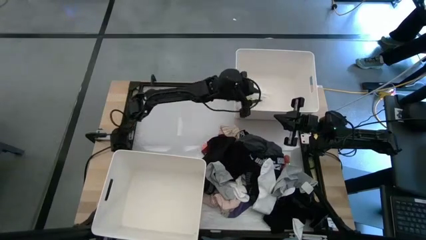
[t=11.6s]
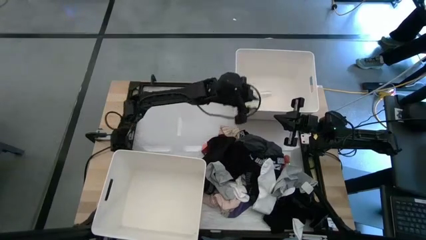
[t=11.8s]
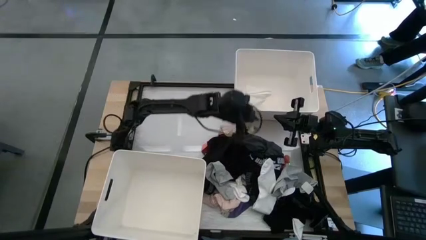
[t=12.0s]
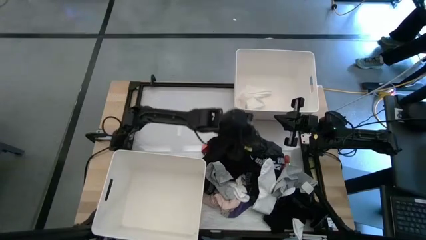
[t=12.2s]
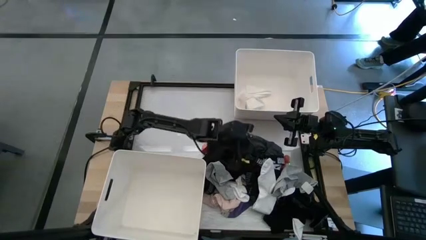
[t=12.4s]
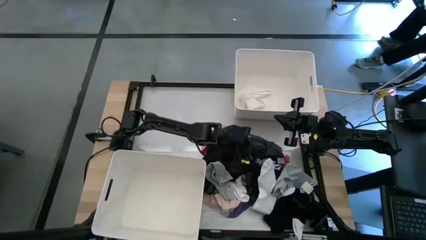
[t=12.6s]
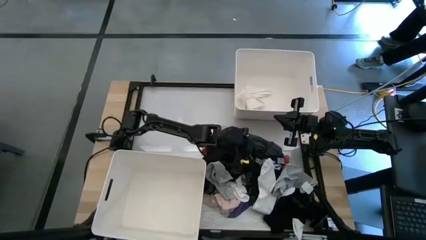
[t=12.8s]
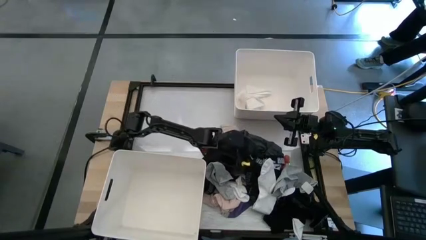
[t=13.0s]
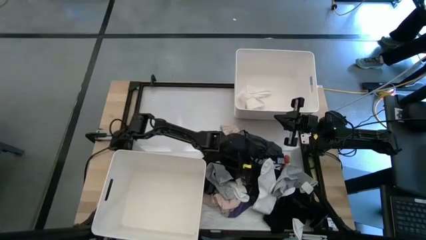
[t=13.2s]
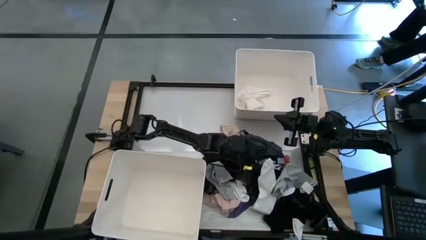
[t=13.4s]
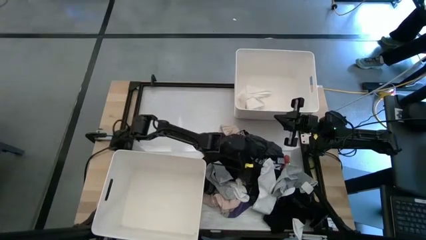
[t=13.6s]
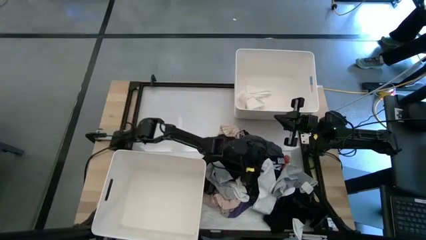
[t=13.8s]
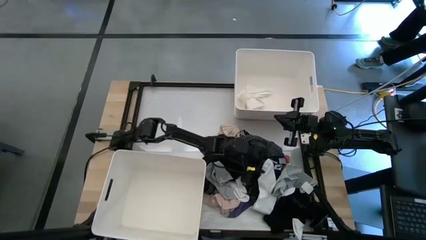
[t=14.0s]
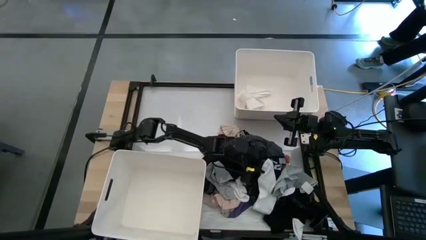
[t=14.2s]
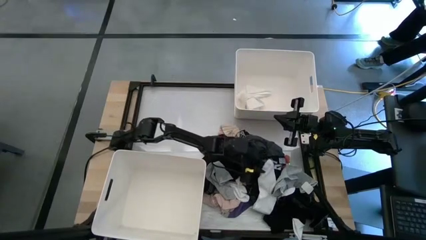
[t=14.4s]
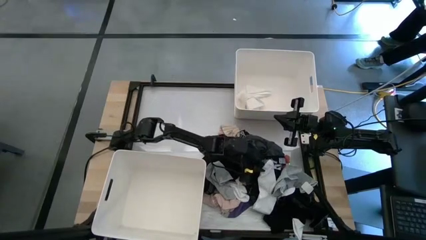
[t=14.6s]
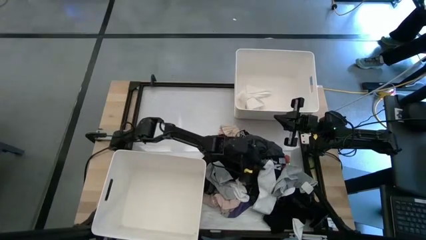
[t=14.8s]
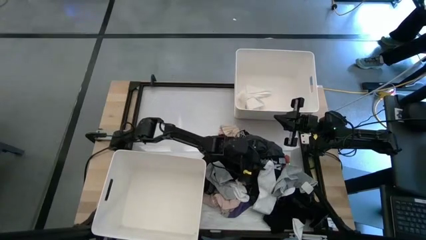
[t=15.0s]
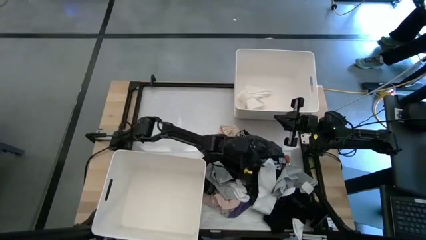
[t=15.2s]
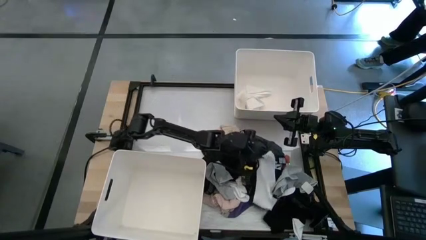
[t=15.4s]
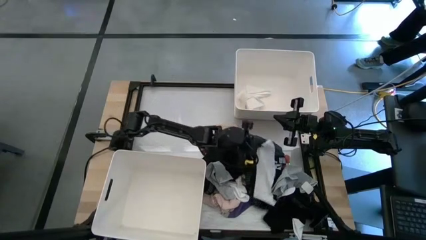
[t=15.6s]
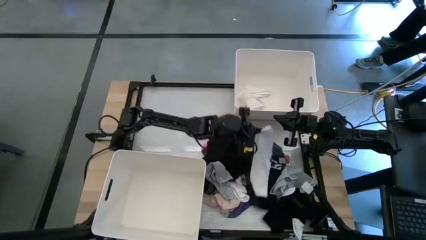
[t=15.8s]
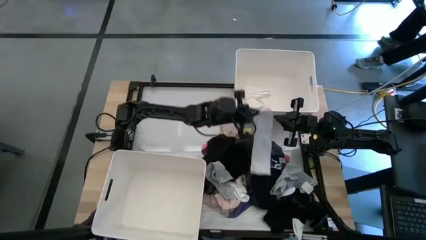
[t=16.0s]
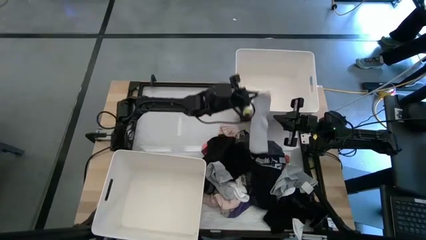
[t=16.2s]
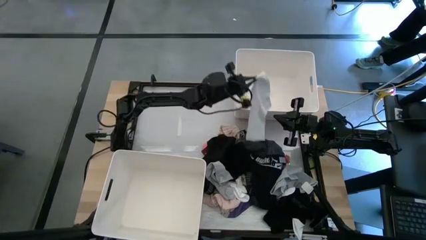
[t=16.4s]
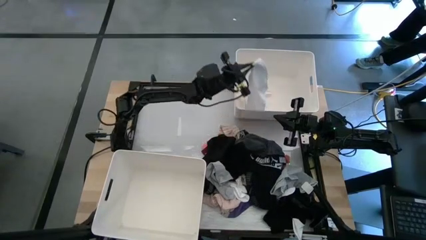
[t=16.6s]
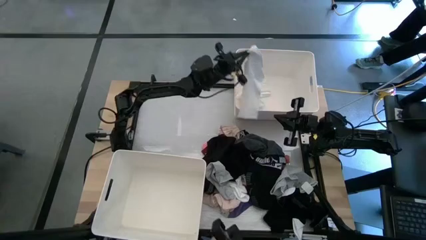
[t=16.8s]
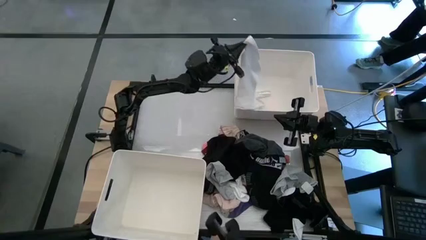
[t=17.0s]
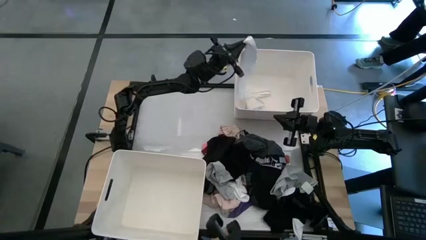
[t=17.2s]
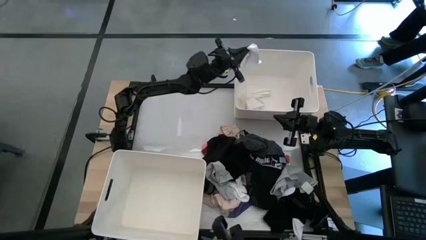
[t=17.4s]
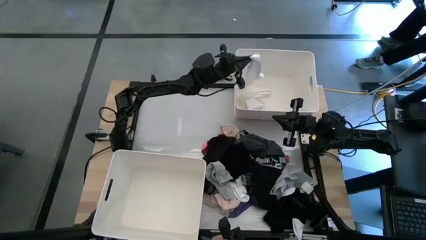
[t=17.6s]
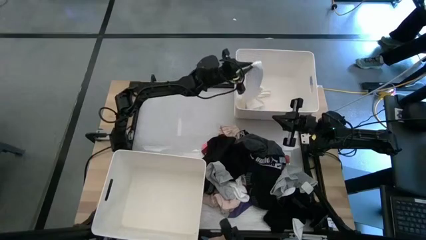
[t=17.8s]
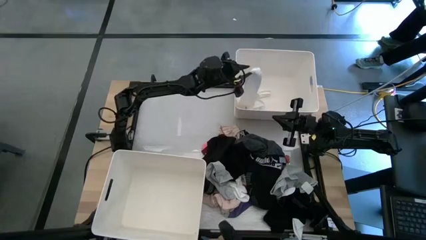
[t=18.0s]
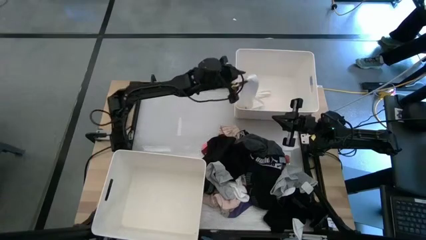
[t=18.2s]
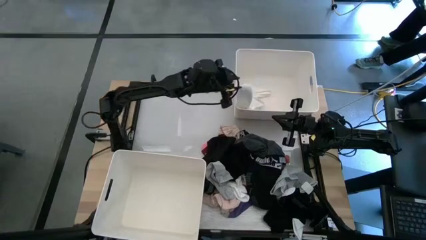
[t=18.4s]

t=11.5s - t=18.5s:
Task: Sort clothes
Put the white sock into the top white laundry bin

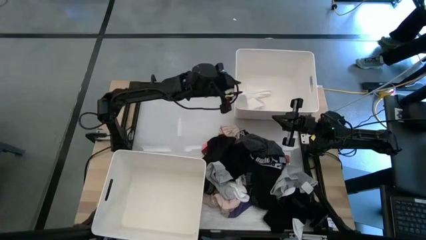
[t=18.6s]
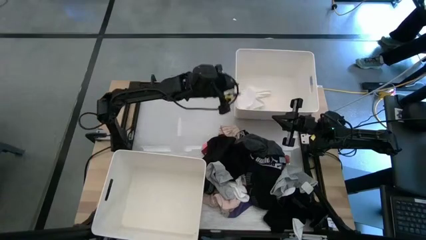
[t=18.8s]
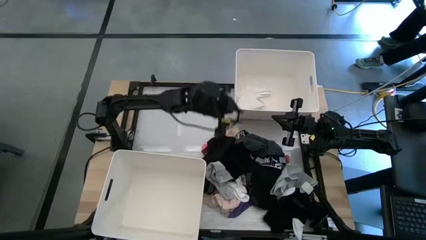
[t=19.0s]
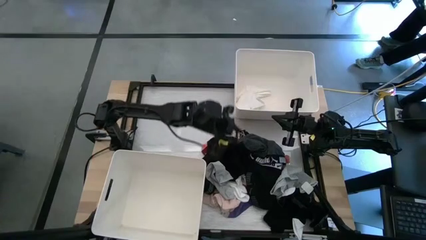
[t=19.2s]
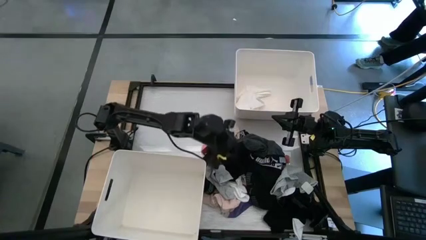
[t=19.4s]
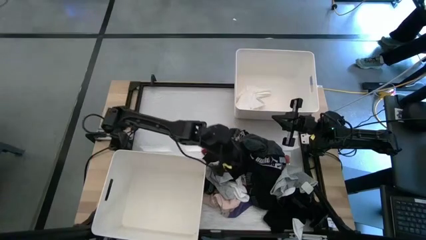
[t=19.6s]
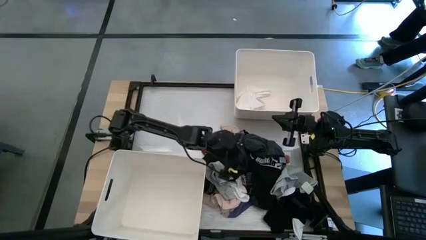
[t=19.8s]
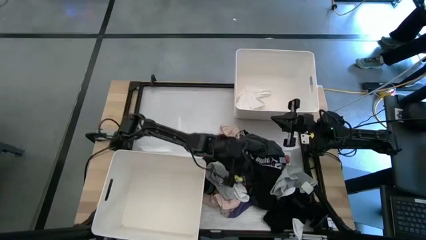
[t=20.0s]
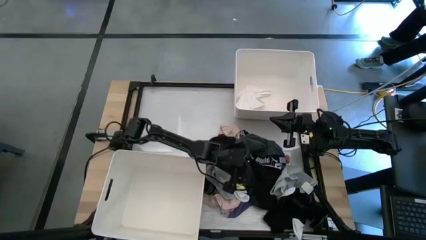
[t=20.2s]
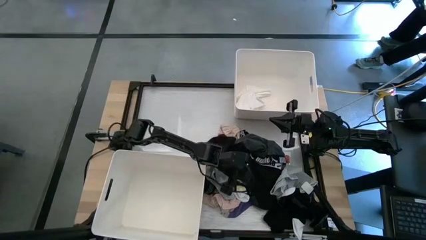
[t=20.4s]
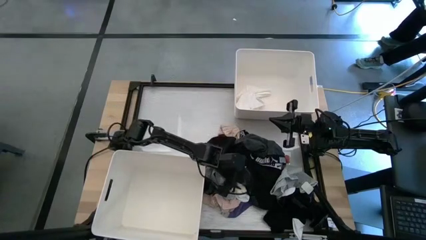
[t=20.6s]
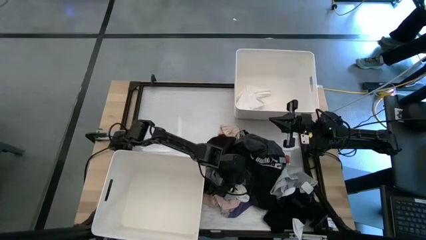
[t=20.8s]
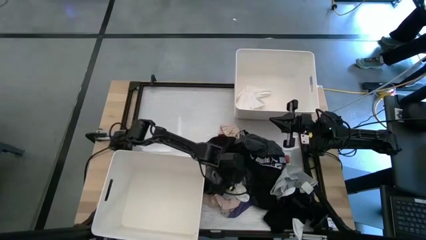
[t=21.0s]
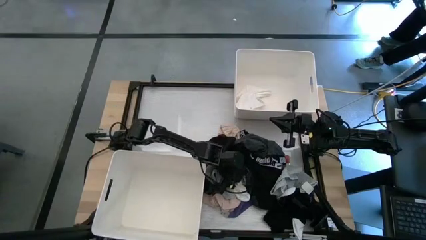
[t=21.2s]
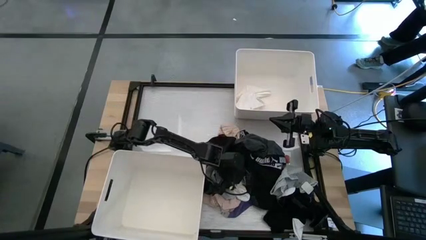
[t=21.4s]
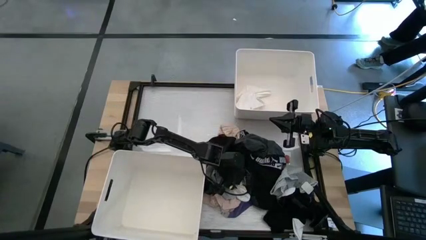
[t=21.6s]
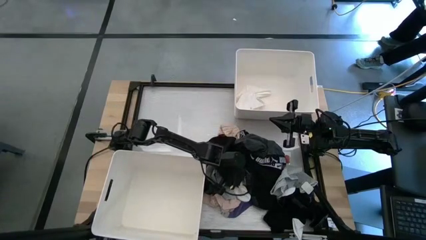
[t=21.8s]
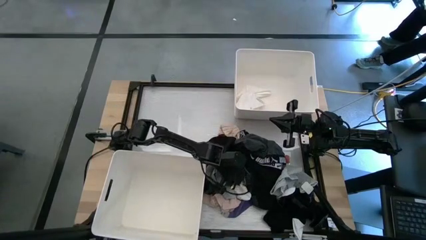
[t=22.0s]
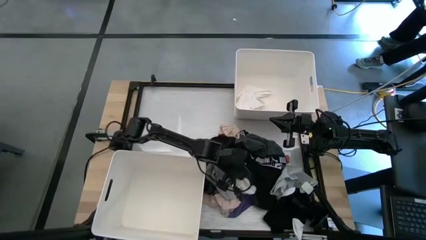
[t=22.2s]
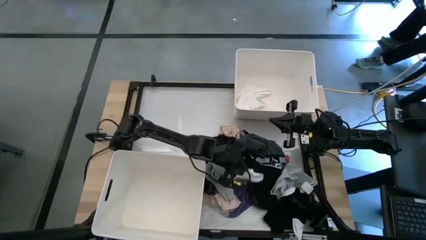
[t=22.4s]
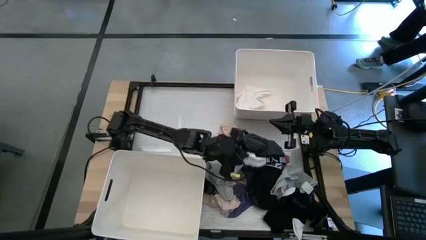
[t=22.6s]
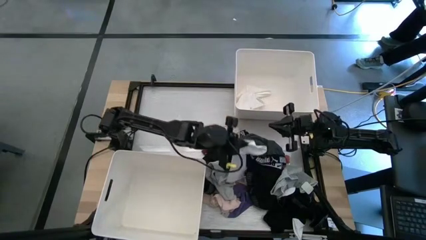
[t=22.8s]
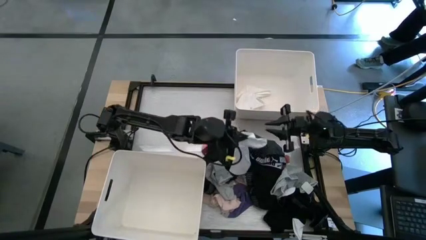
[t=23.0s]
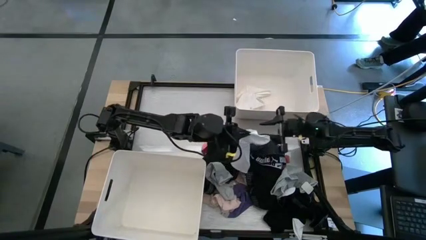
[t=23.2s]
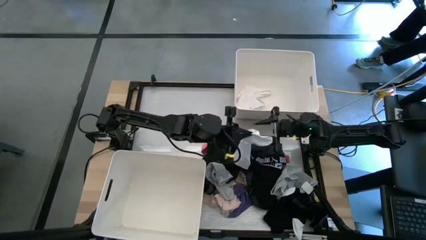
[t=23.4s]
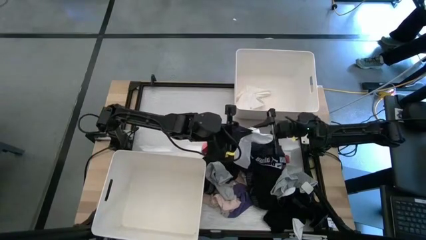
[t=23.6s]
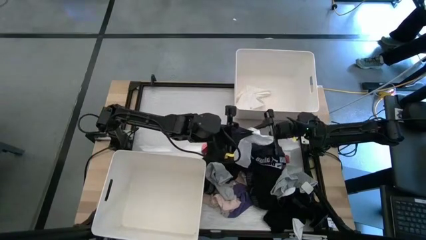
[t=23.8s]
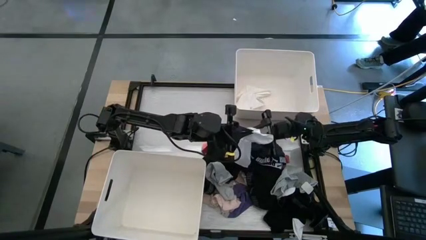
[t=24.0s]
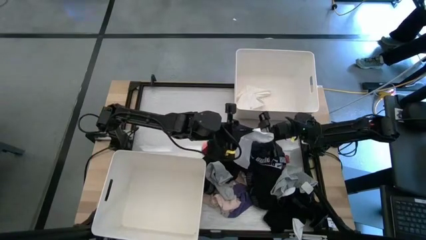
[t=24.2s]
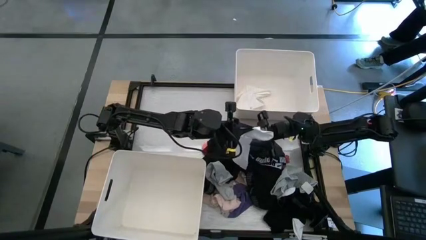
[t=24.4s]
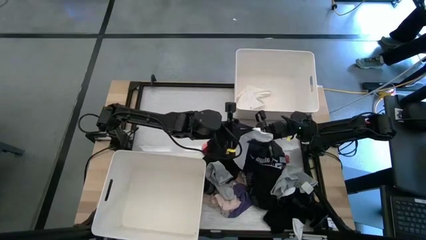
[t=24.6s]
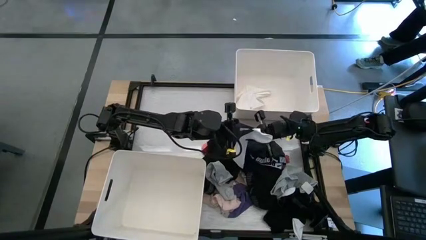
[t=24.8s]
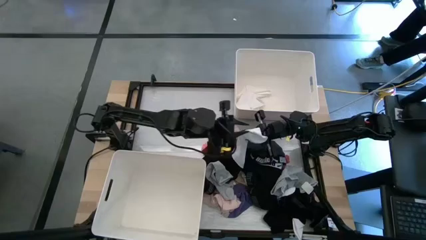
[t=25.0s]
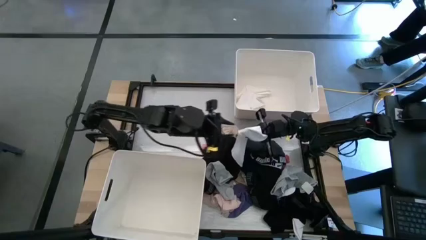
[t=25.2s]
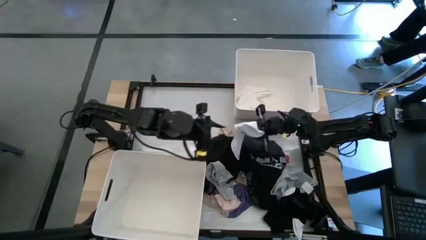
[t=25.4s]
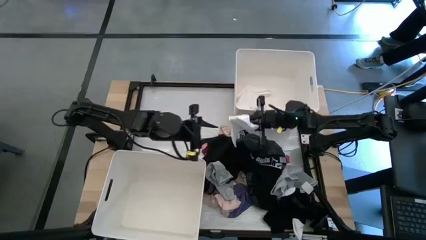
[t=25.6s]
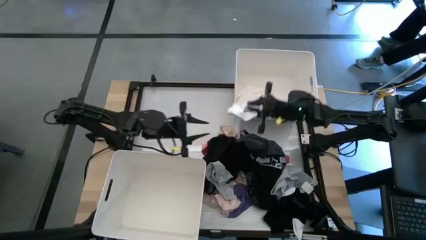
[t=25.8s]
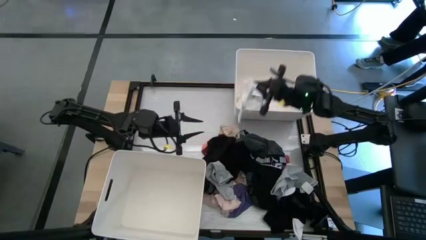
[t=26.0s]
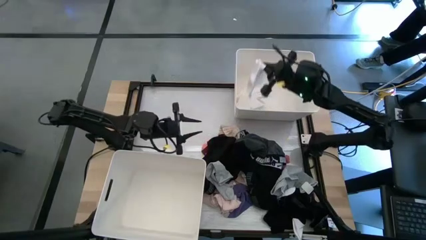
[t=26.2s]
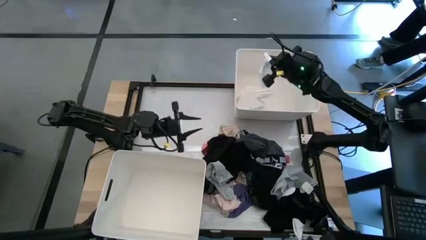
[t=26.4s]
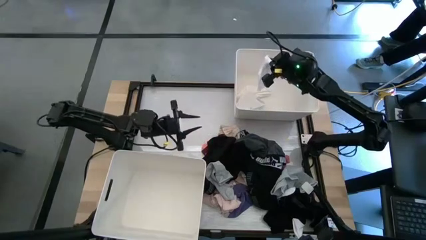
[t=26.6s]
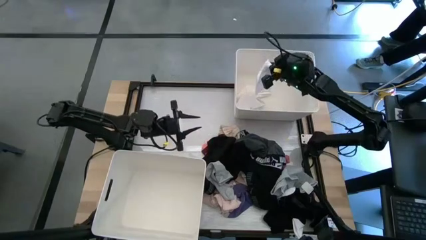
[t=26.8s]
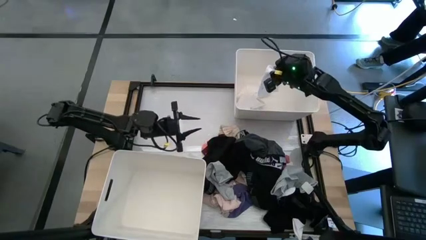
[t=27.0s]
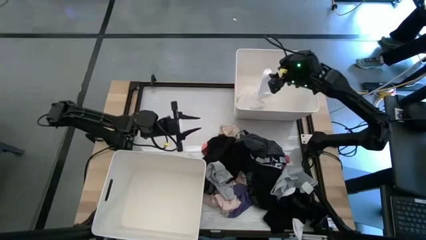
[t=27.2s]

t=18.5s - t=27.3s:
Put the white sock into the top white laundry bin
